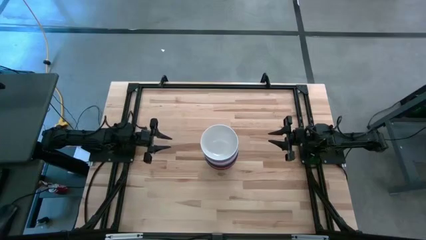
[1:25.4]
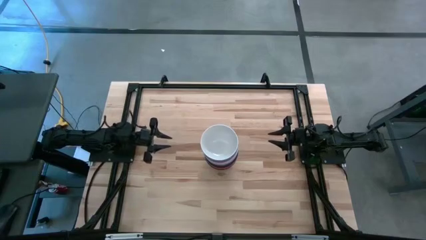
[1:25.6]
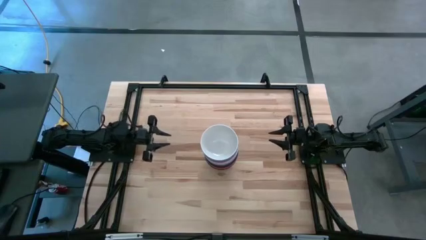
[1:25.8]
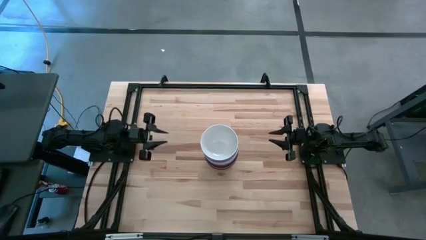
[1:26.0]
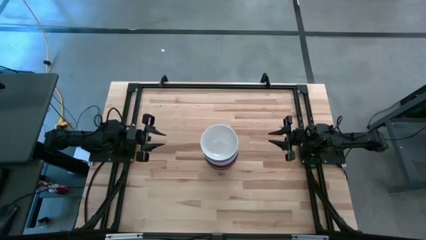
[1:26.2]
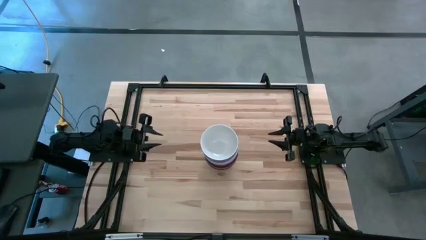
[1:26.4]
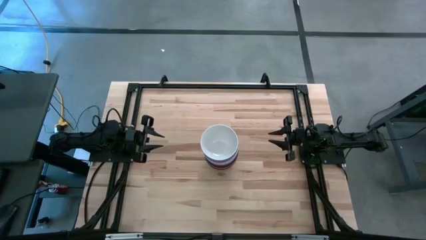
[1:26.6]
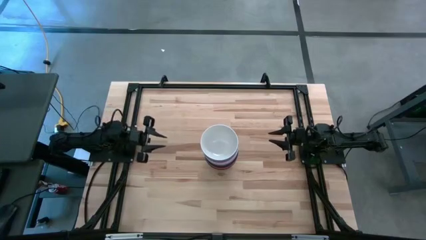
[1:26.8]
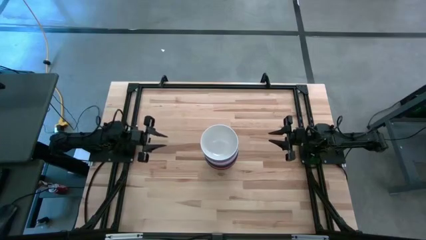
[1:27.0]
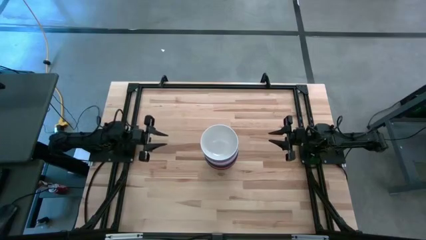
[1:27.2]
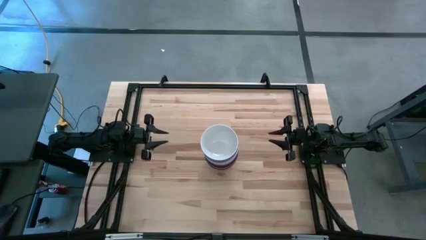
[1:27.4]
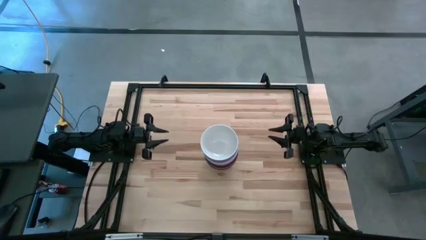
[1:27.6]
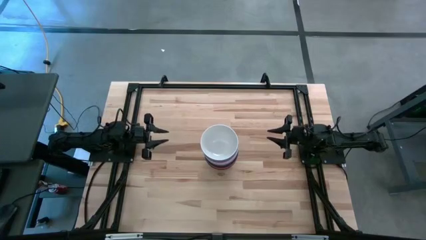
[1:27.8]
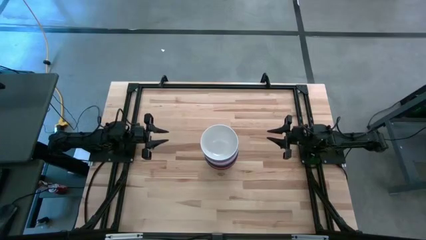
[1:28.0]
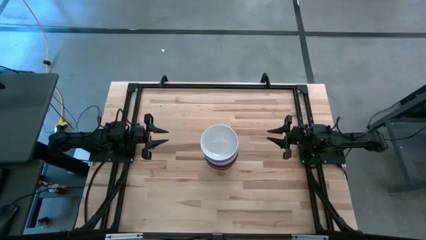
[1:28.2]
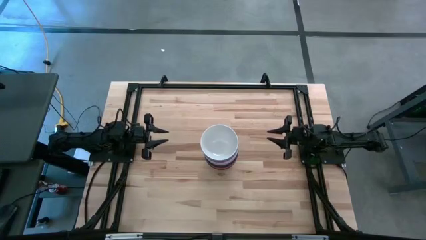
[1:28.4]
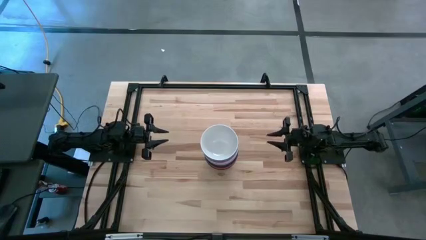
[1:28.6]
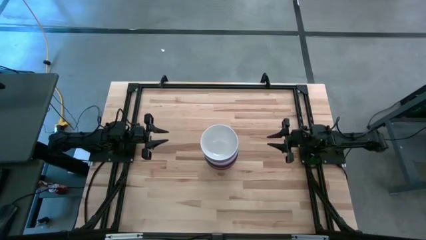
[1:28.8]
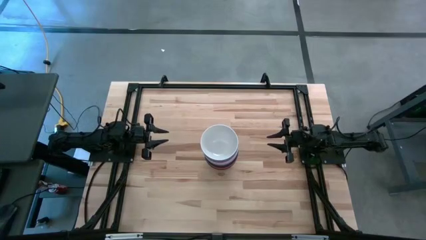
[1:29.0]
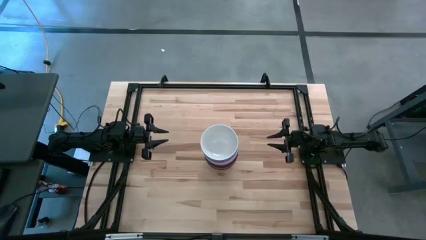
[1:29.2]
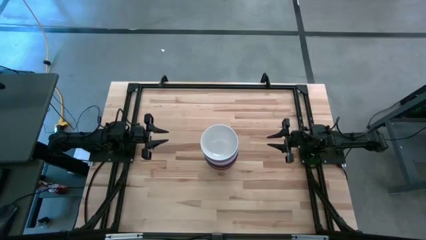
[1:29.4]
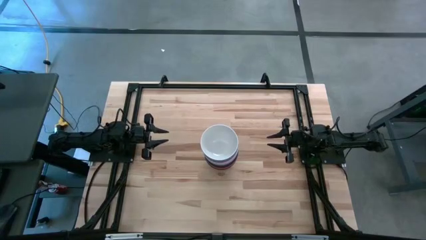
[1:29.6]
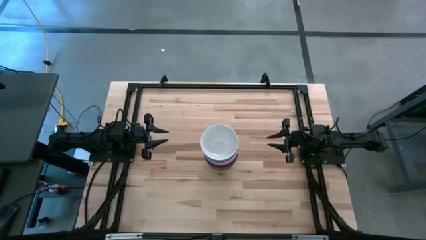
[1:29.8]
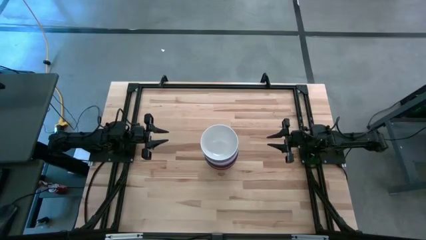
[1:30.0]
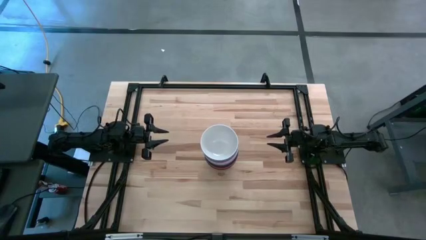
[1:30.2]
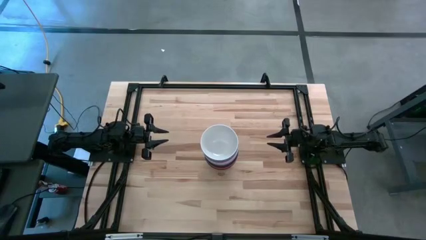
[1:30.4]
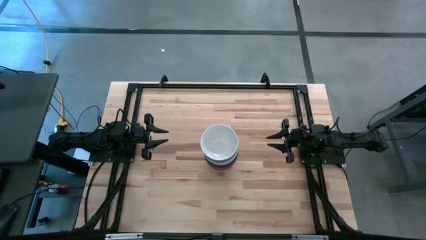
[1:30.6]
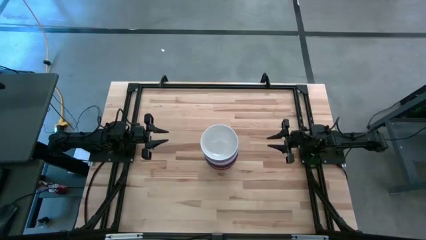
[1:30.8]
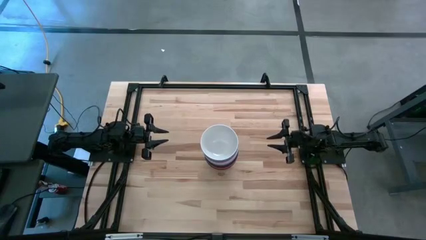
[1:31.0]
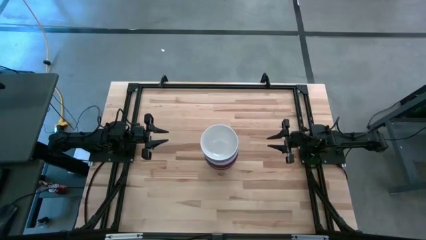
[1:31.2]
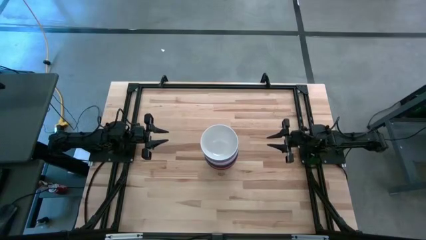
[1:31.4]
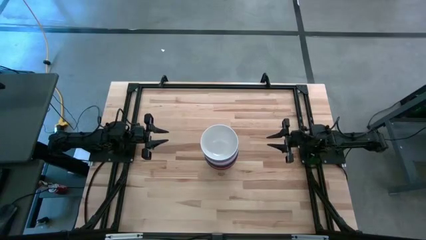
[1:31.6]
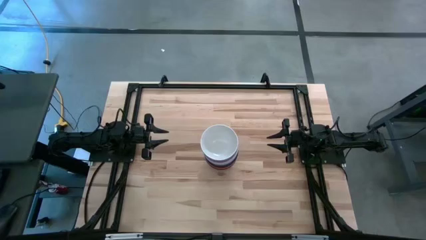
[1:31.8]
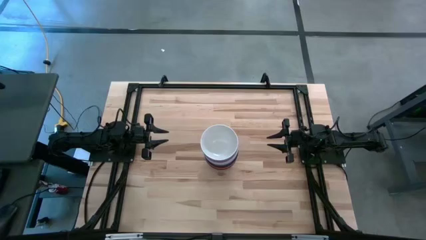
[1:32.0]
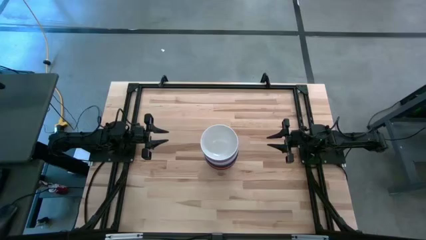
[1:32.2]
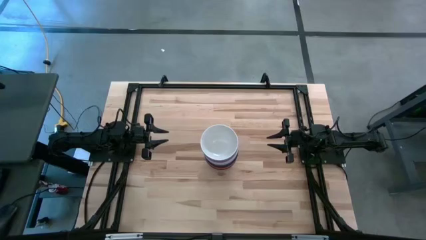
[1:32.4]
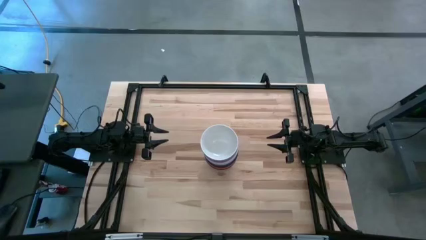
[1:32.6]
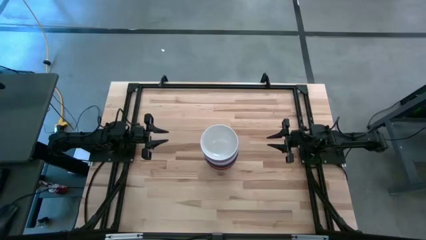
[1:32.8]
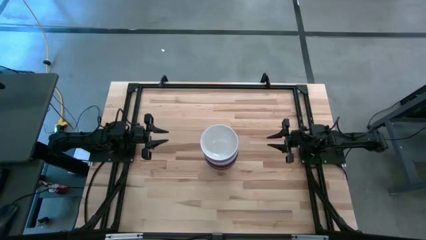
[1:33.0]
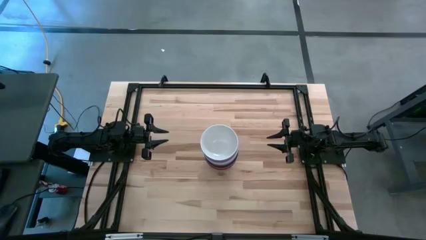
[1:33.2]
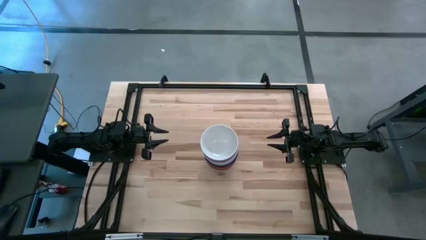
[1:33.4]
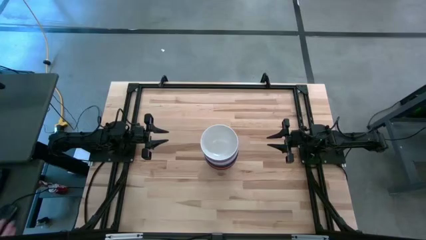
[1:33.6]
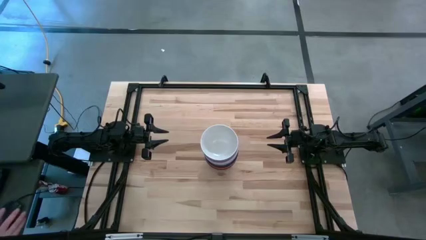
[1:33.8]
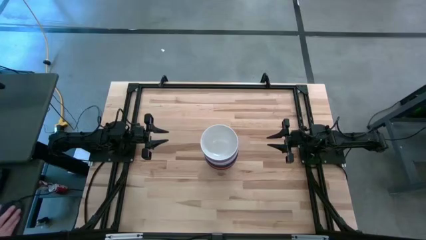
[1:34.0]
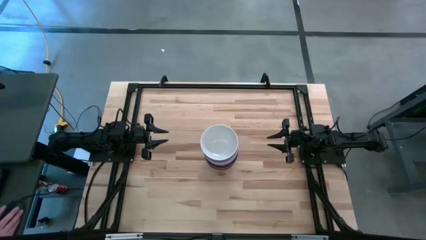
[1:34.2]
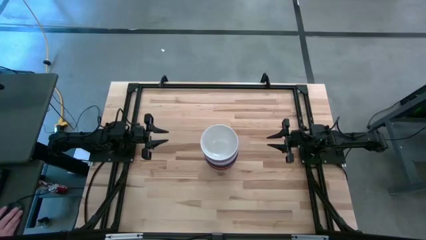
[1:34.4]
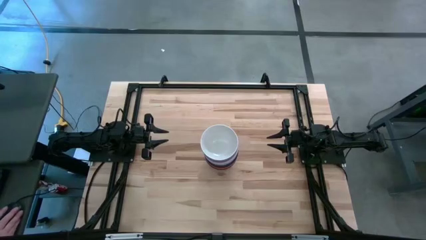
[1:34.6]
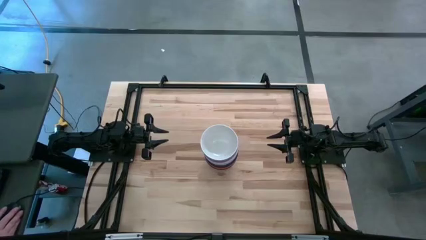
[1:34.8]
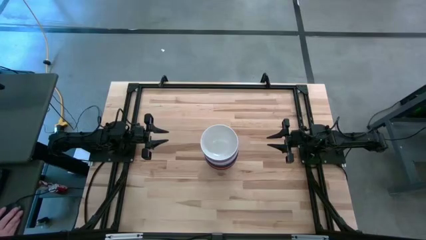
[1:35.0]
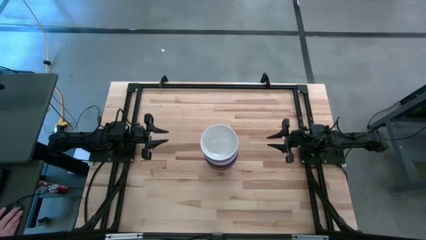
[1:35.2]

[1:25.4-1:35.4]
Task: Nest bowls inside each other
Return to Home Position

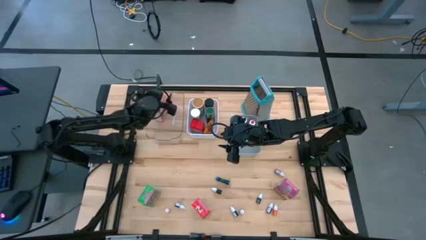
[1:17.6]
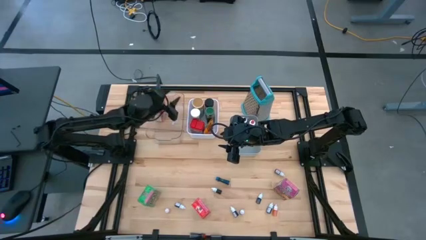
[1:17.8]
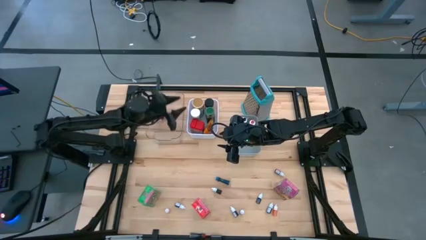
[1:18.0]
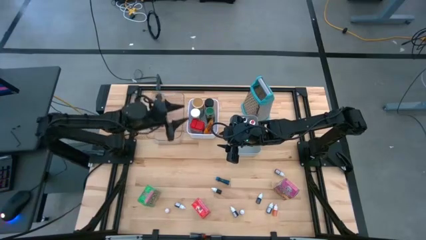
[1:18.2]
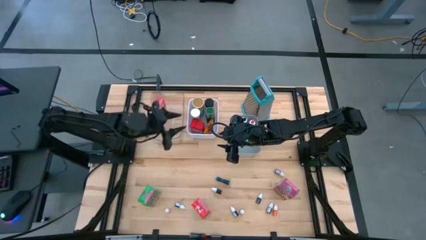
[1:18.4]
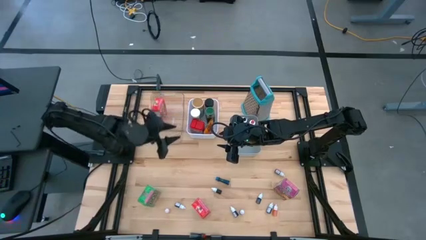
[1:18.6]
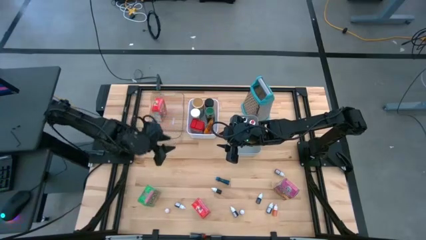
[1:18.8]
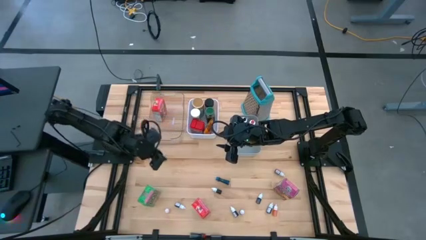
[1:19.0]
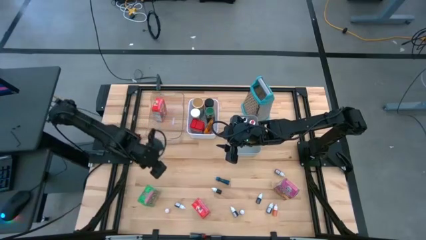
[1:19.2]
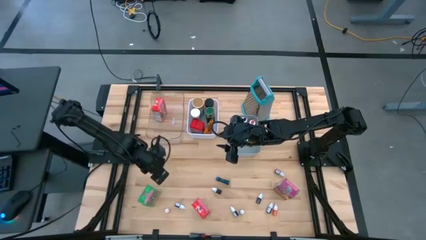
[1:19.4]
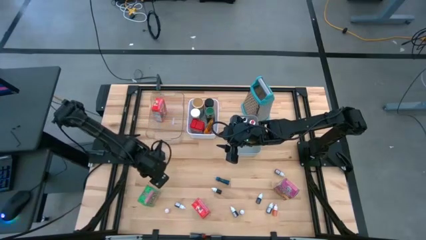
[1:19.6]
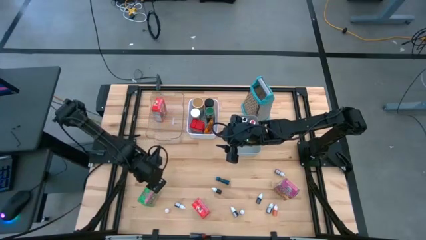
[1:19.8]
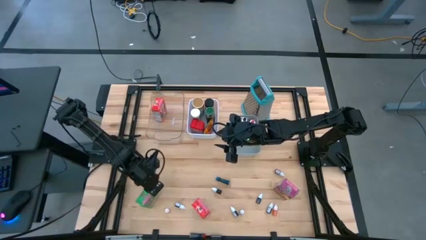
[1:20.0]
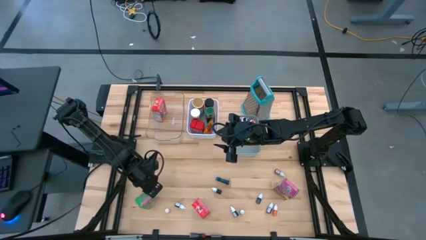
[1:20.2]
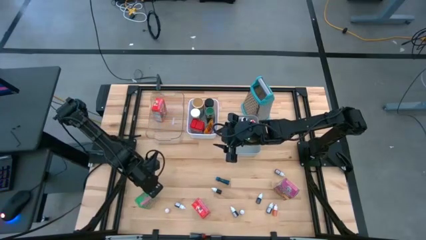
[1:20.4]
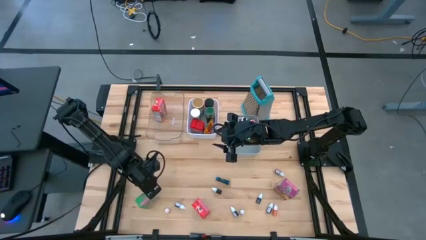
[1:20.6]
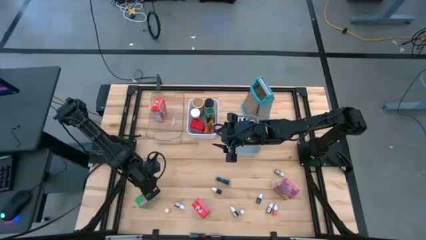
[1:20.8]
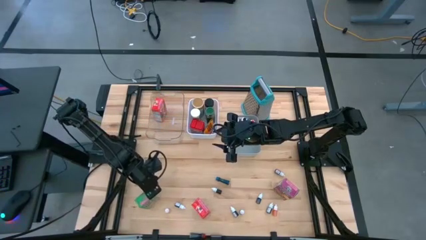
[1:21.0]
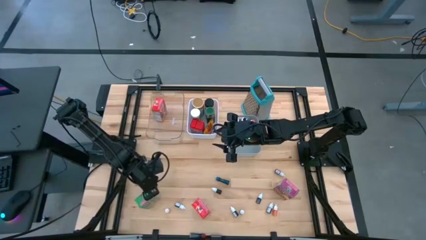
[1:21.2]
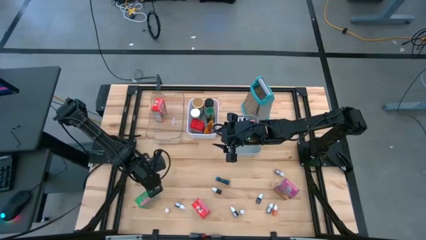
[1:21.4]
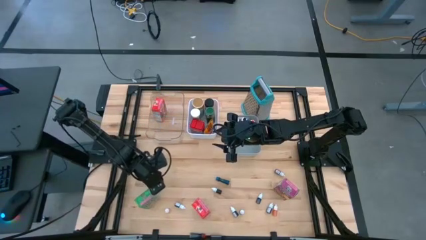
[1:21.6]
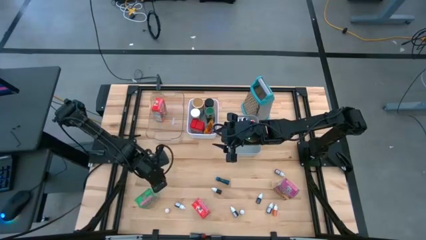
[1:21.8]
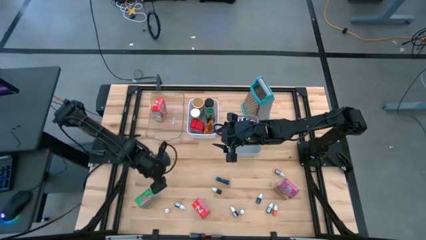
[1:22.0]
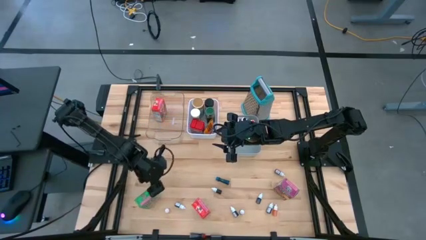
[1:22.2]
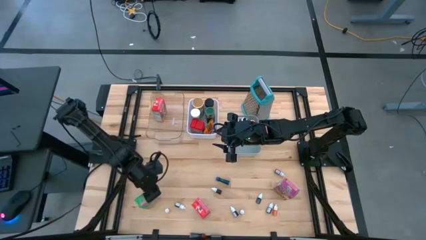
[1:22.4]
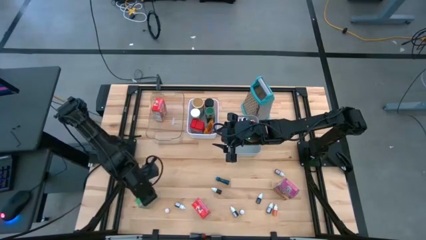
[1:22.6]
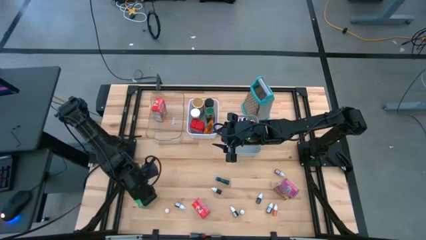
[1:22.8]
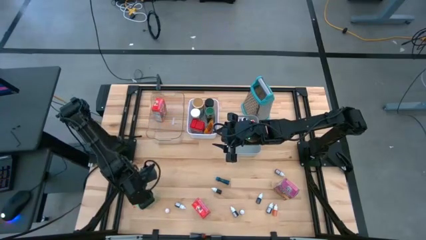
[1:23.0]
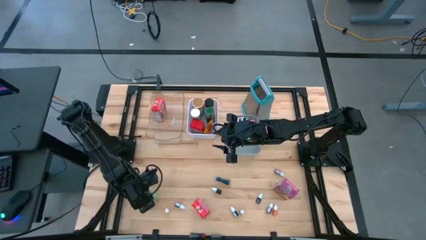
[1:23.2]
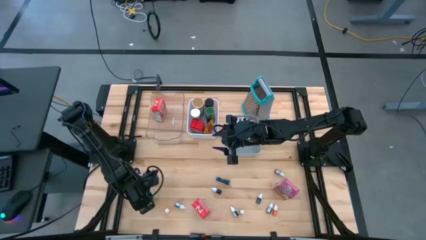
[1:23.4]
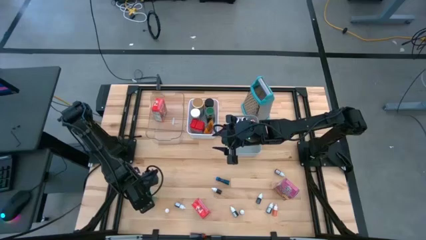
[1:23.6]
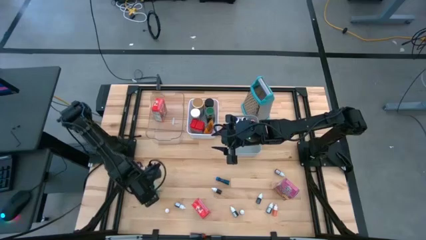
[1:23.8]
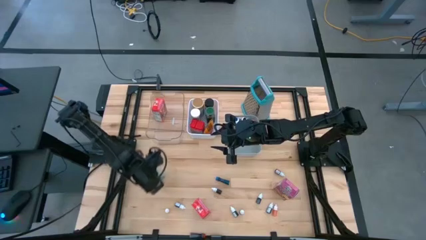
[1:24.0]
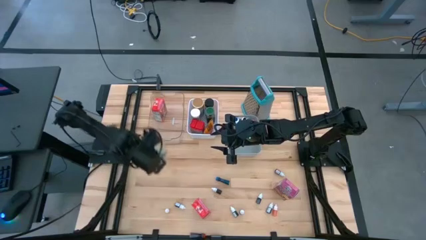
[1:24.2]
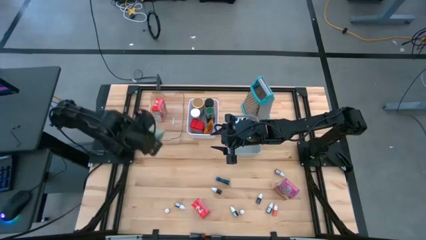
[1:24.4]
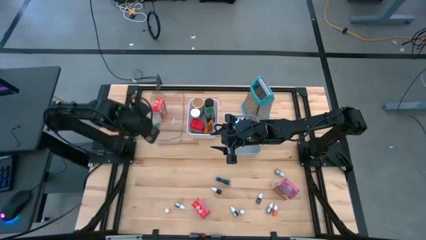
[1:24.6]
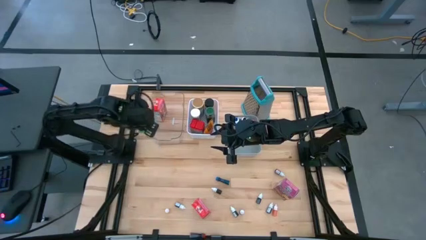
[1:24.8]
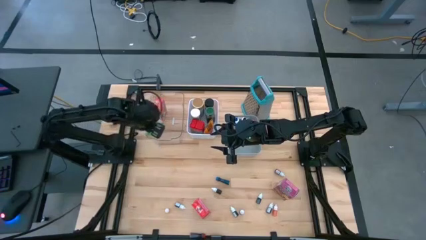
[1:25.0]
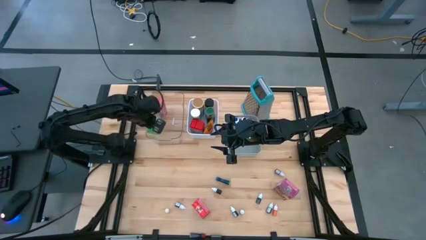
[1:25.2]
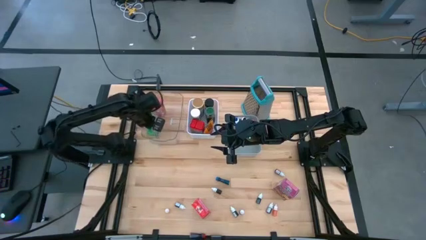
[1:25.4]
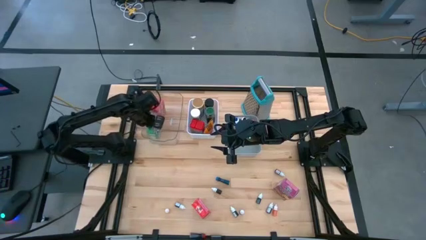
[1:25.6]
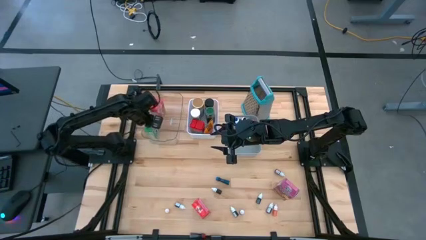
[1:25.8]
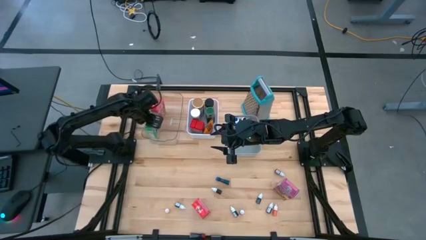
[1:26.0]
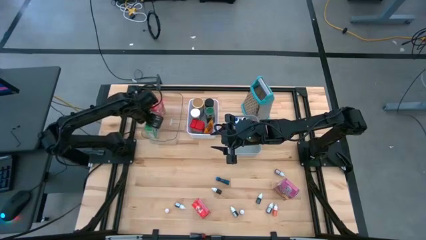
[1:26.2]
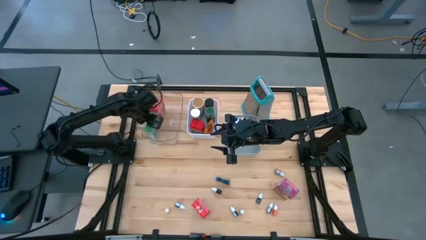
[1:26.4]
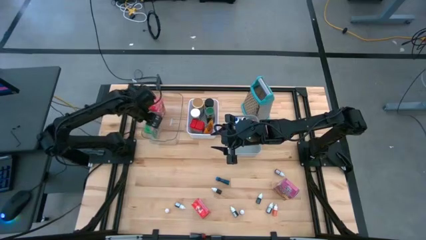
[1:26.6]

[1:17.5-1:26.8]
Task: Pick & Place Kitchen Items
Put the green cereal box into the transparent bin
